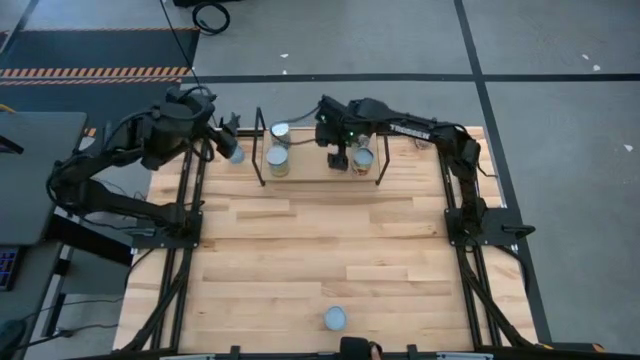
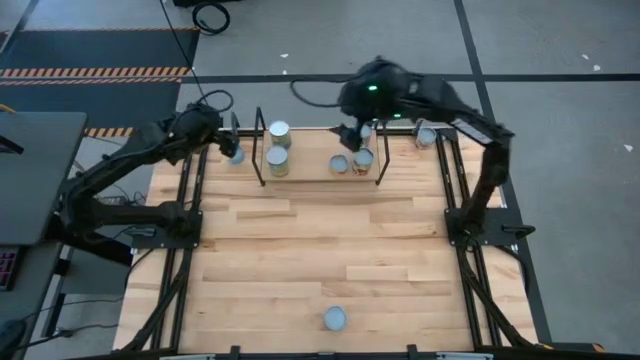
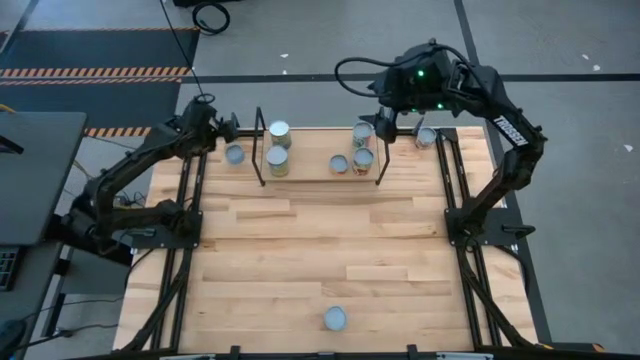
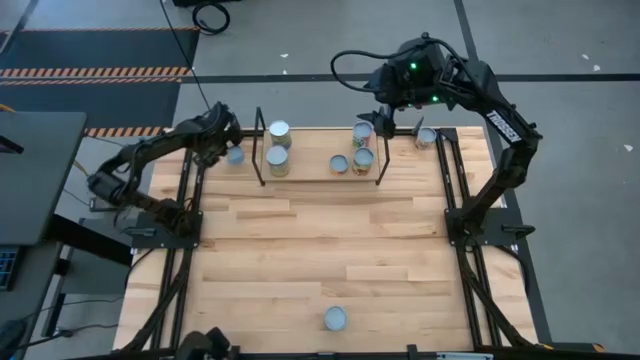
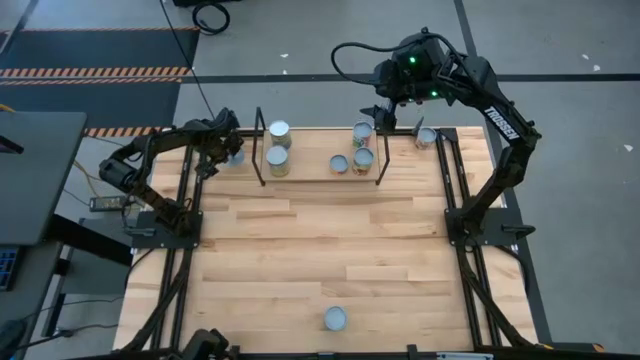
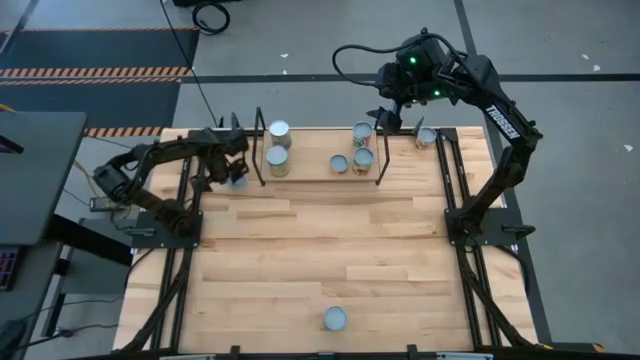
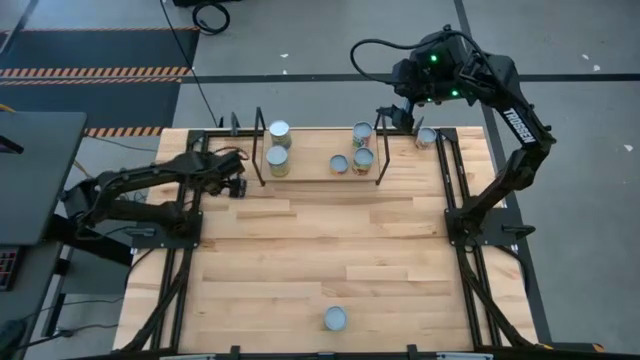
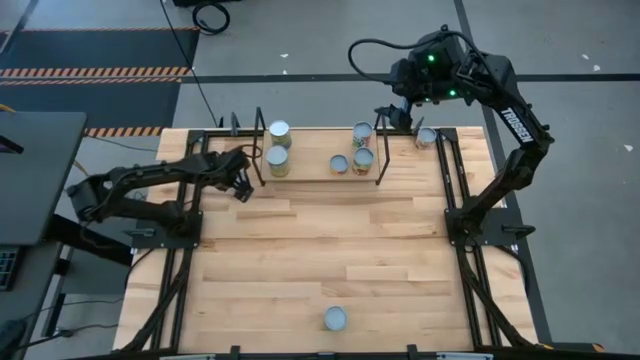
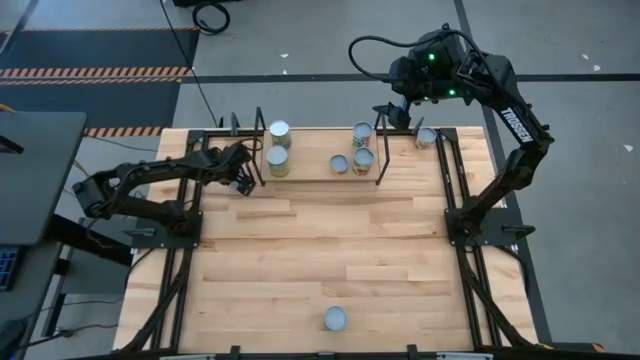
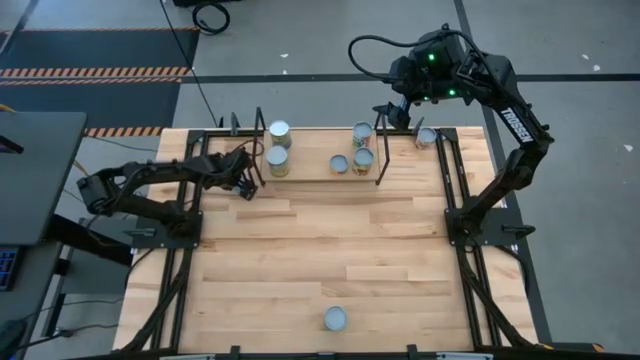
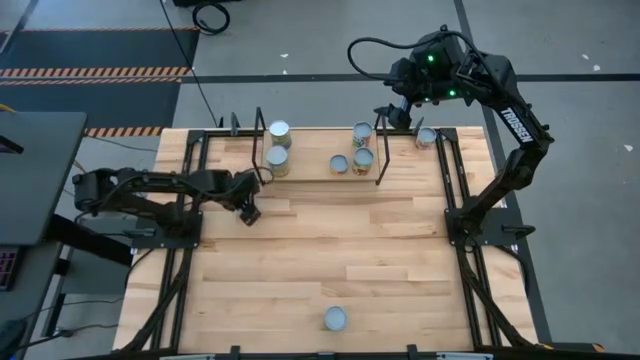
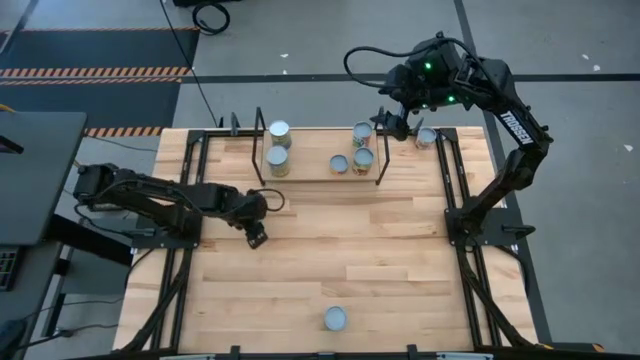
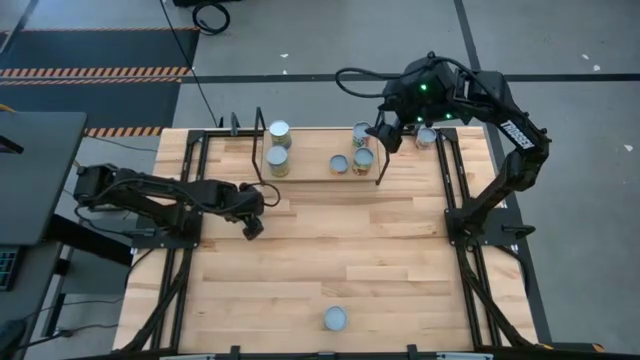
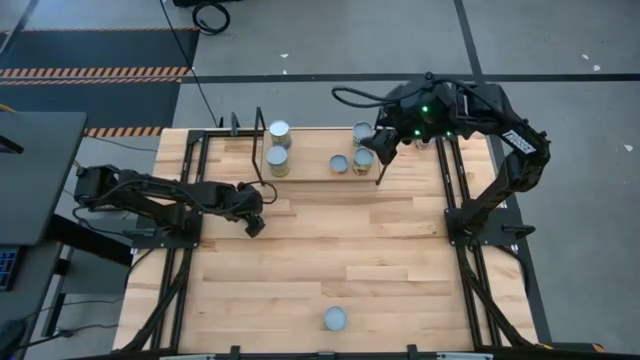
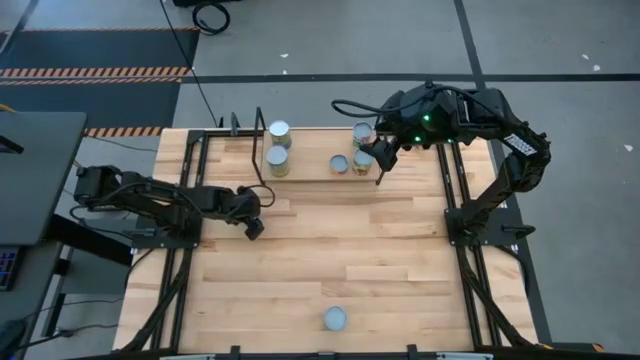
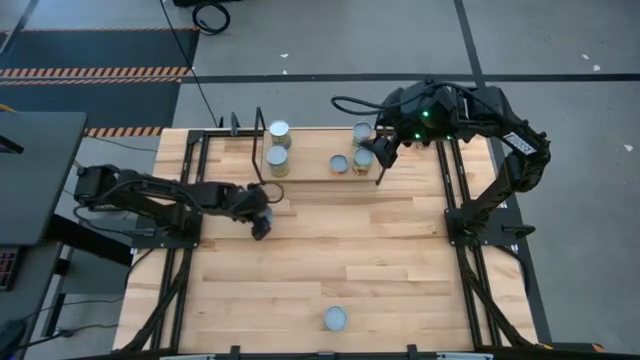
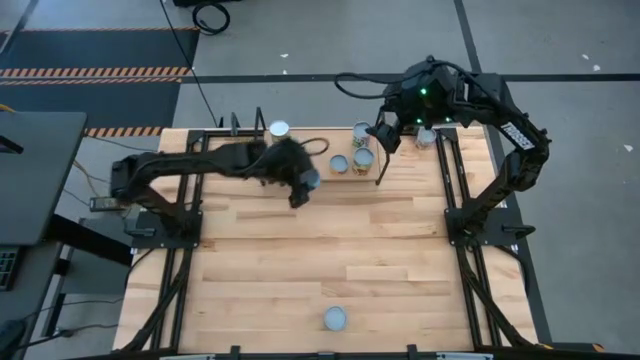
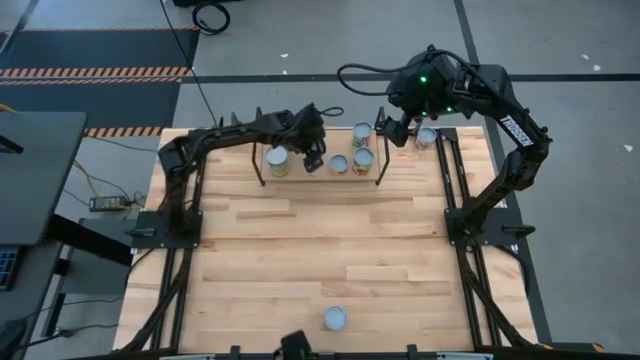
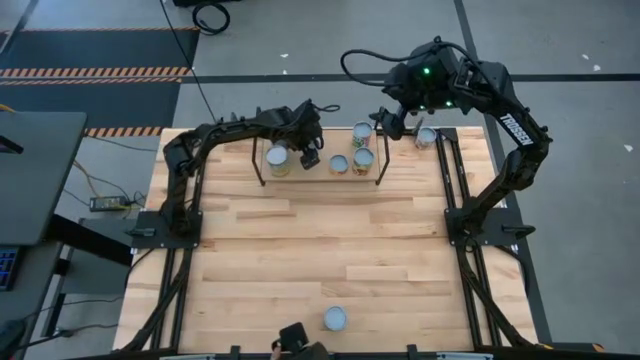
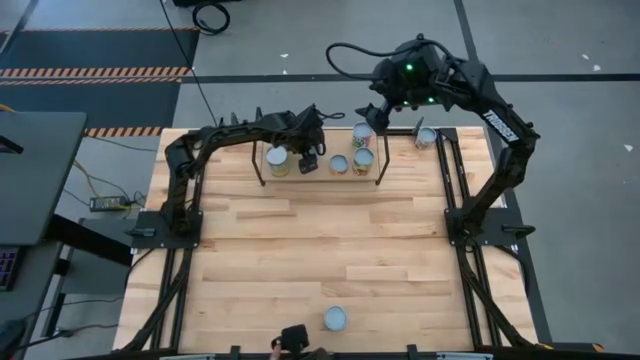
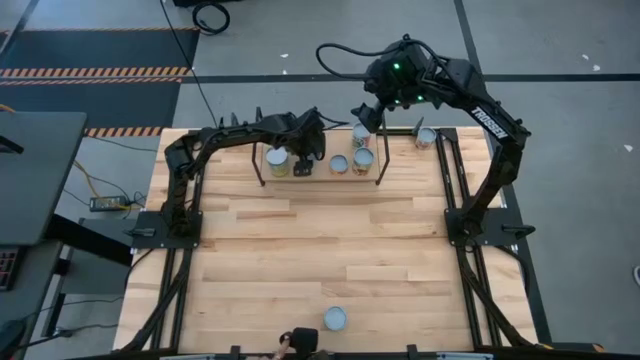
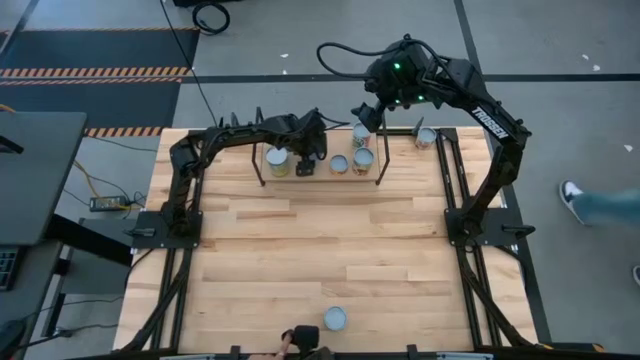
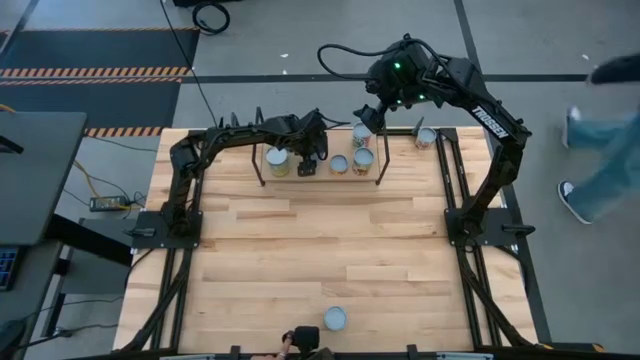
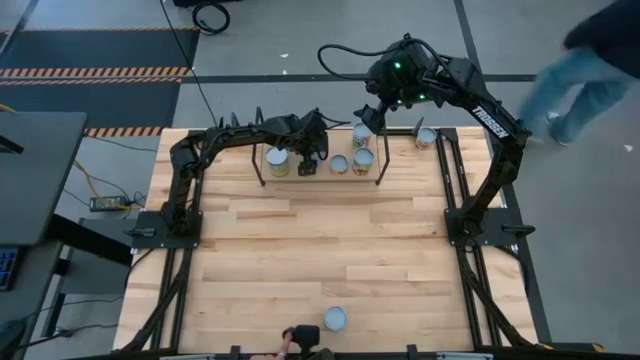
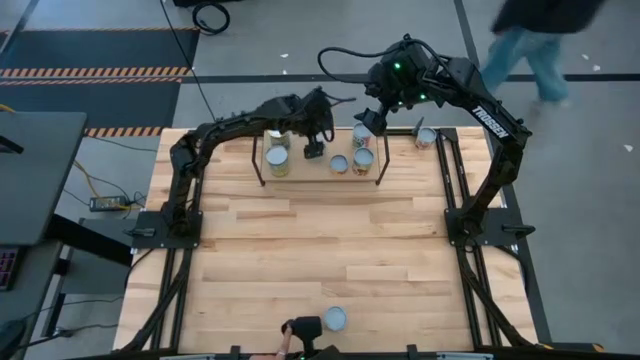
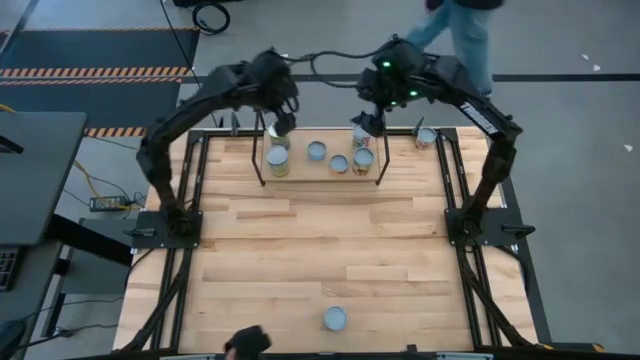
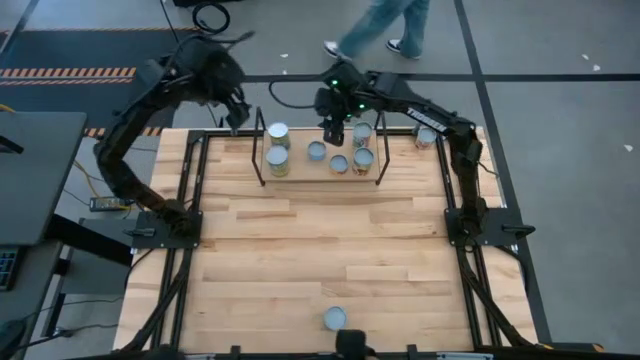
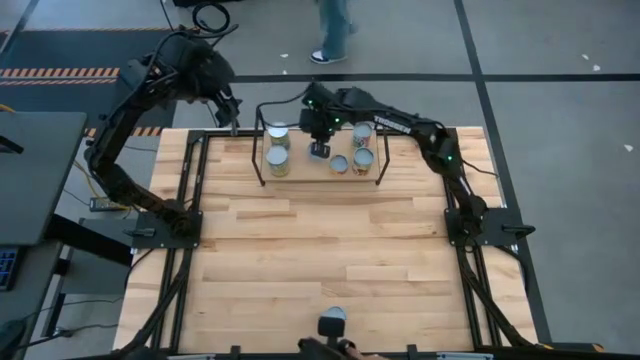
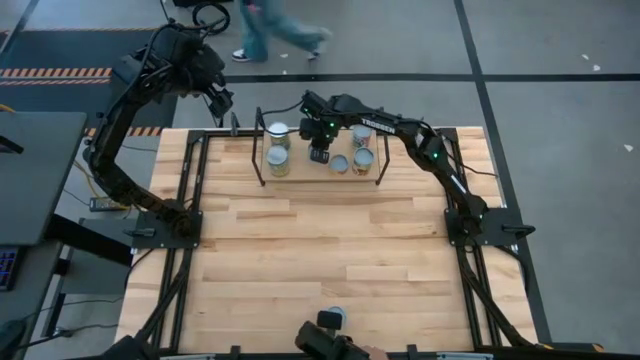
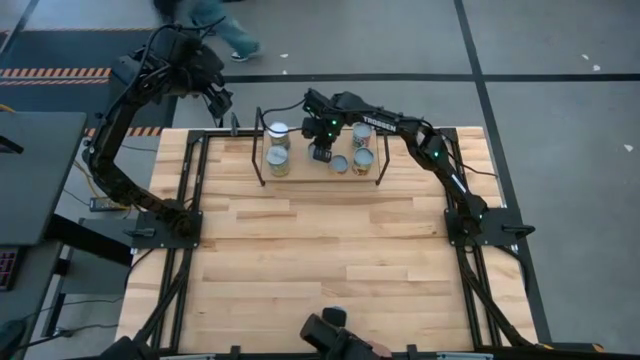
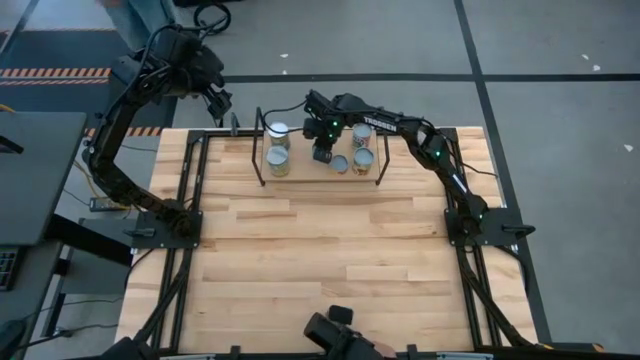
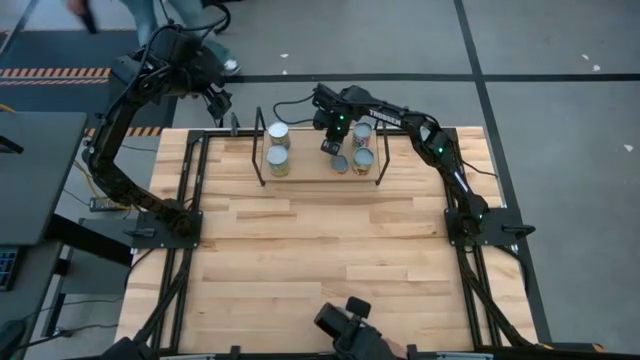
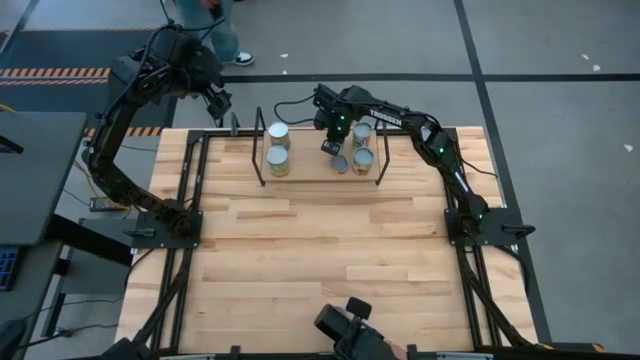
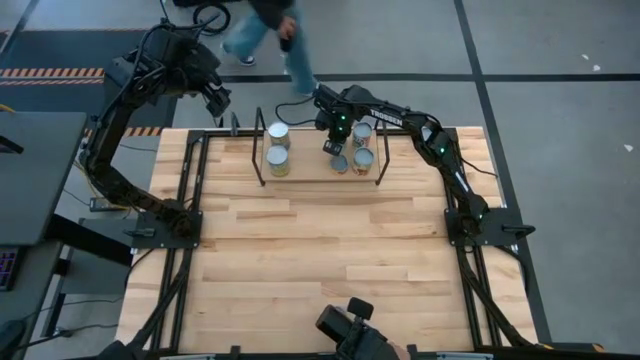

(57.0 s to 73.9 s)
Task: Pick and place cans onto a shelf
Put the light blue can on the shelf aligned with the yellow can

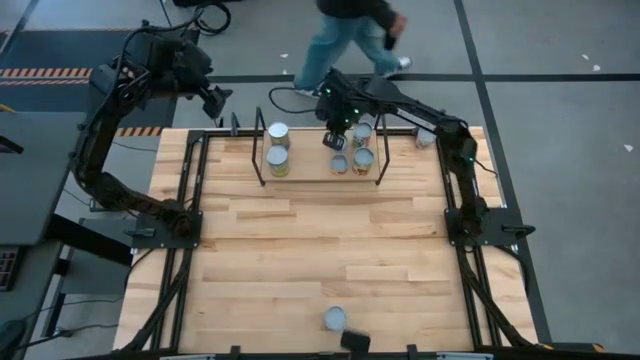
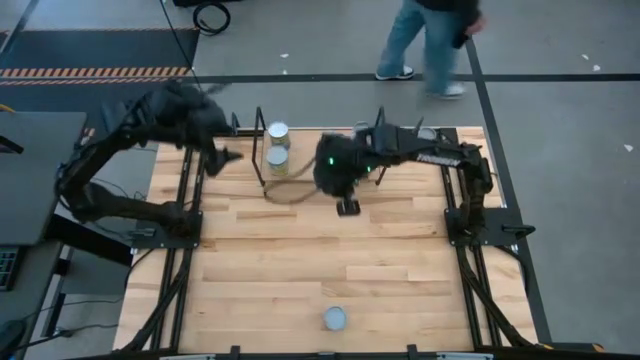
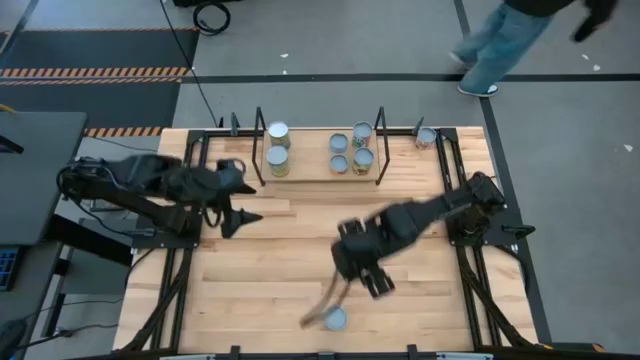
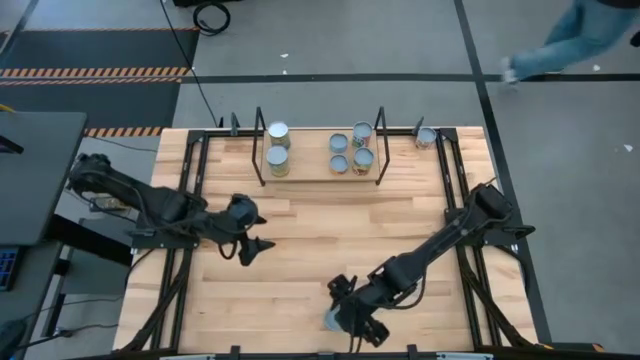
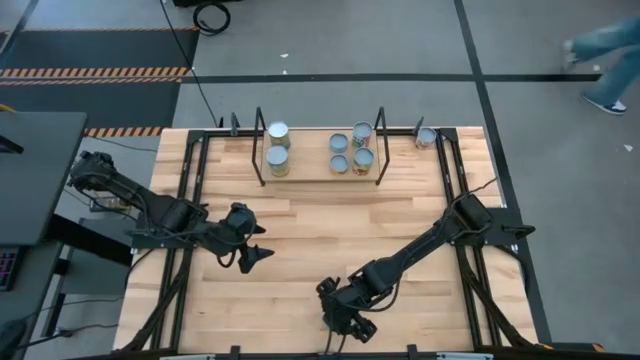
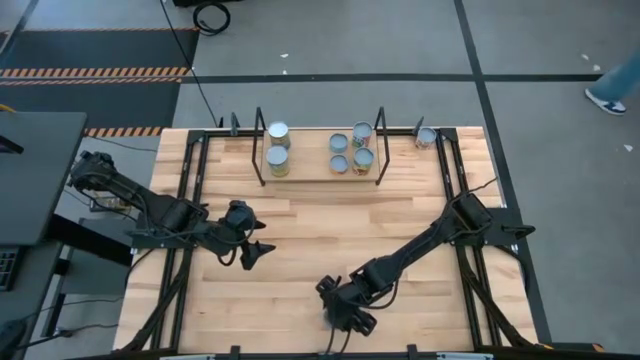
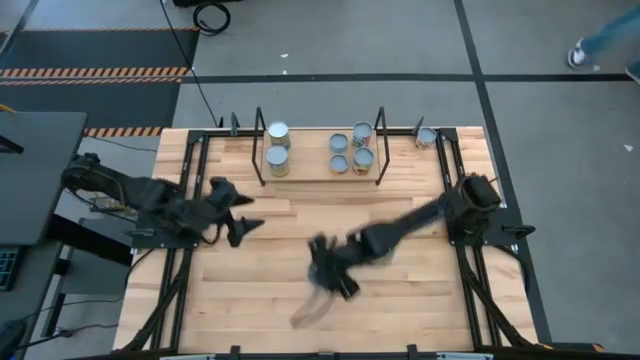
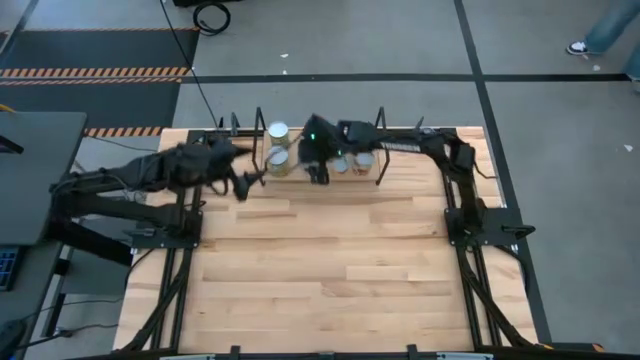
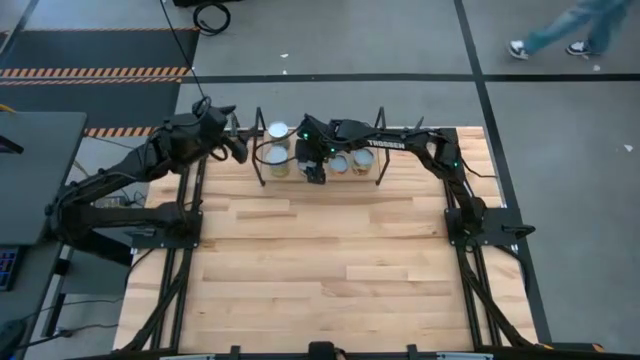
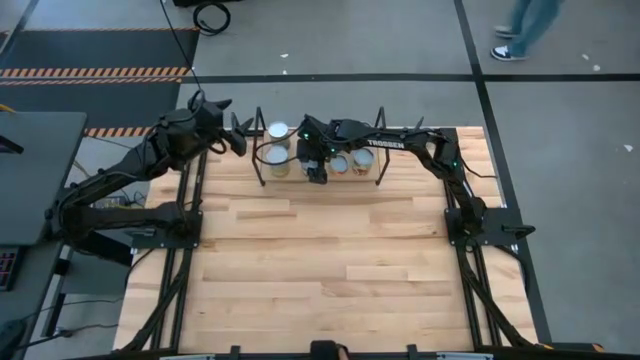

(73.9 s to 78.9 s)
Put the orange can on the shelf aligned with the light orange can
